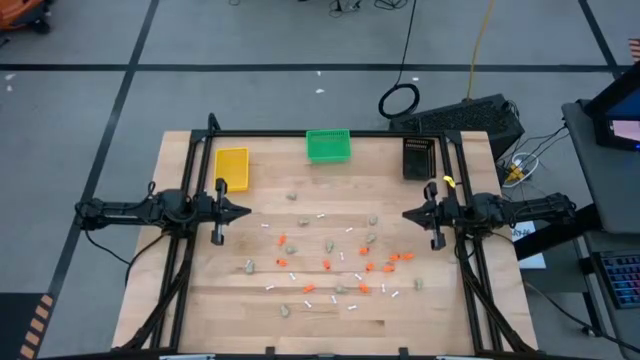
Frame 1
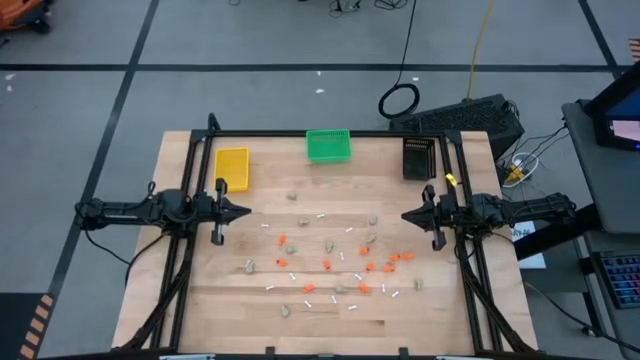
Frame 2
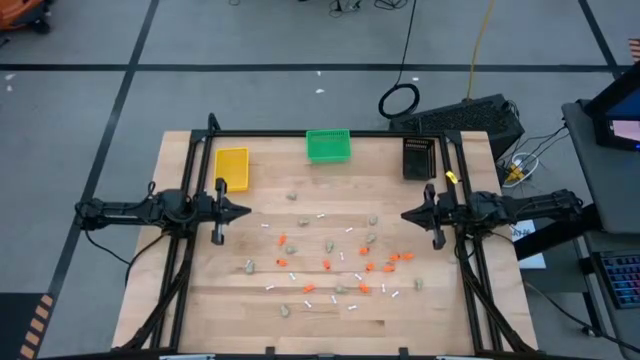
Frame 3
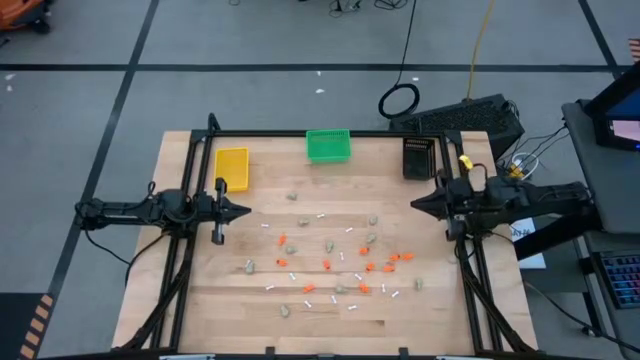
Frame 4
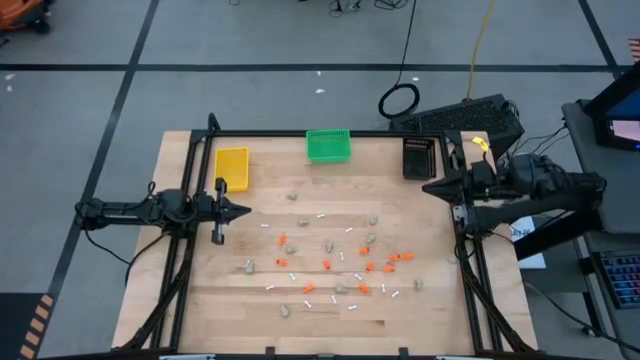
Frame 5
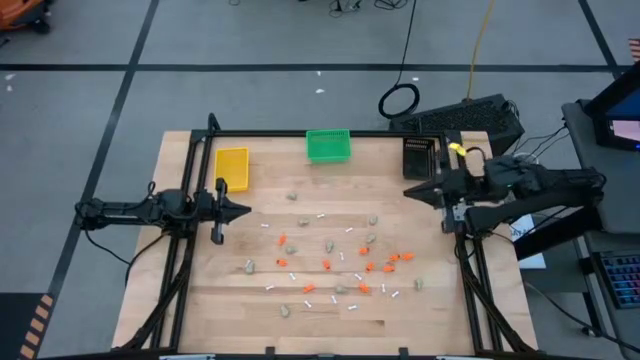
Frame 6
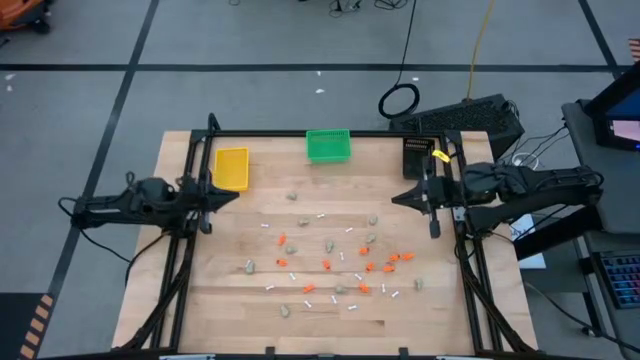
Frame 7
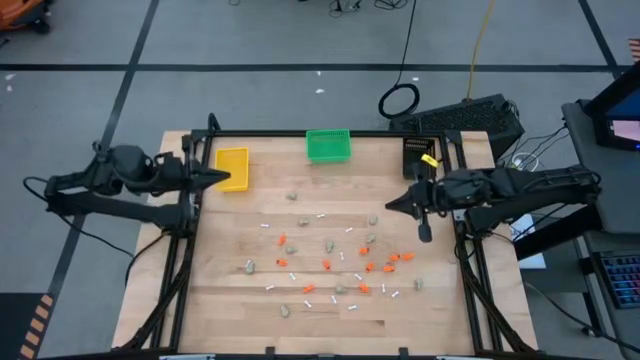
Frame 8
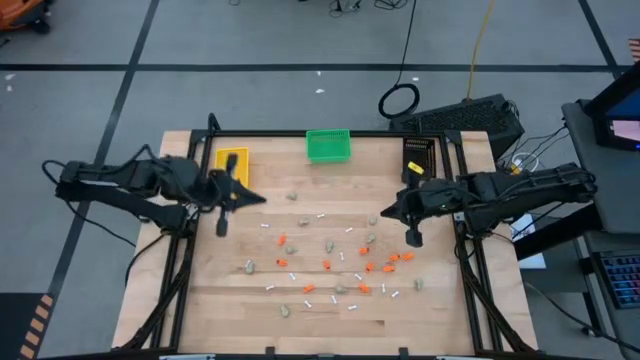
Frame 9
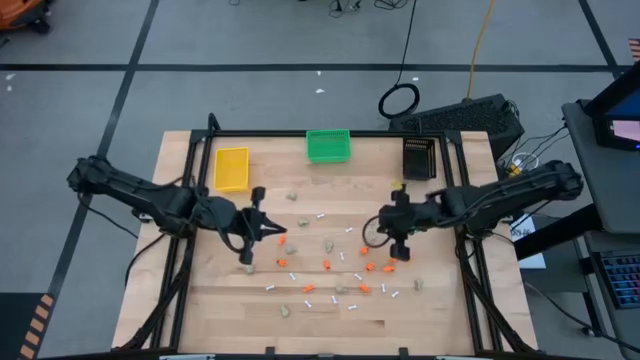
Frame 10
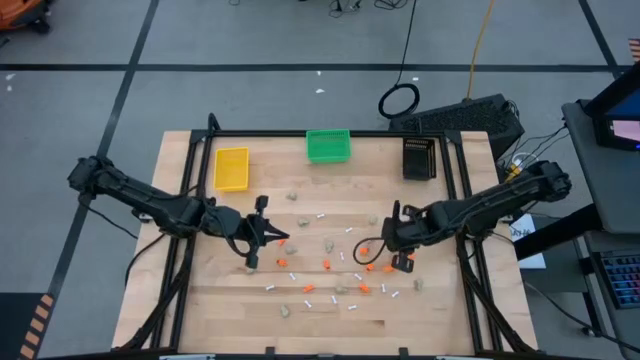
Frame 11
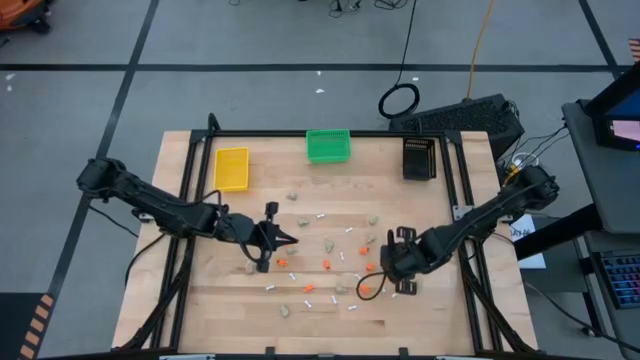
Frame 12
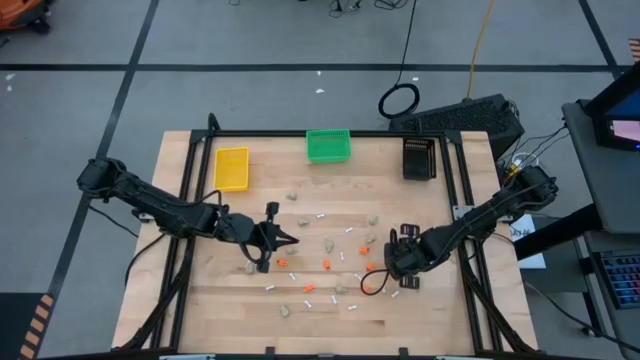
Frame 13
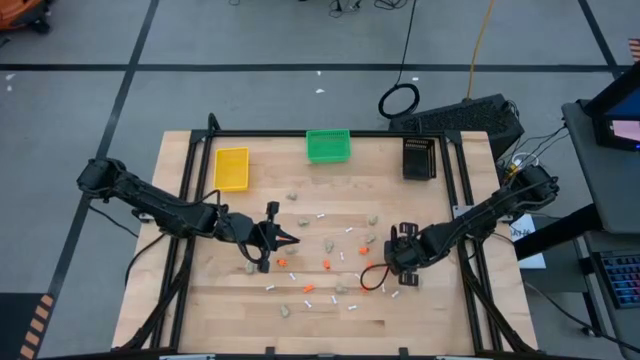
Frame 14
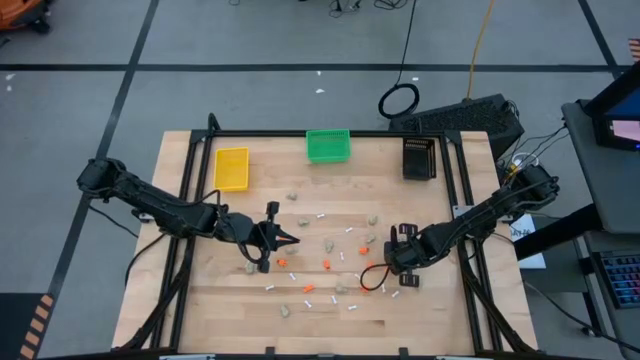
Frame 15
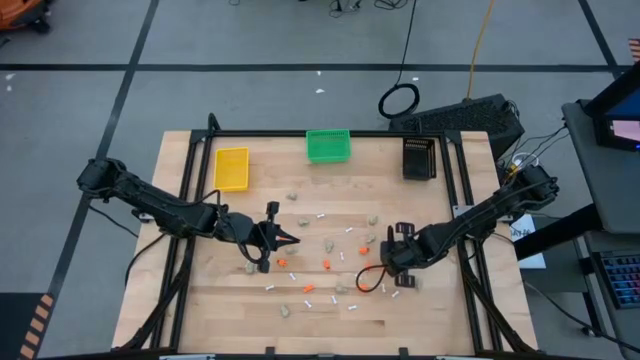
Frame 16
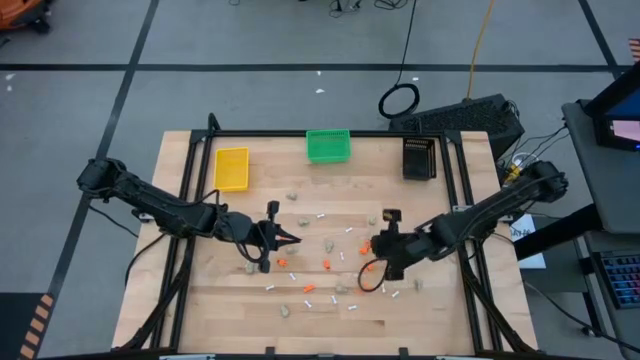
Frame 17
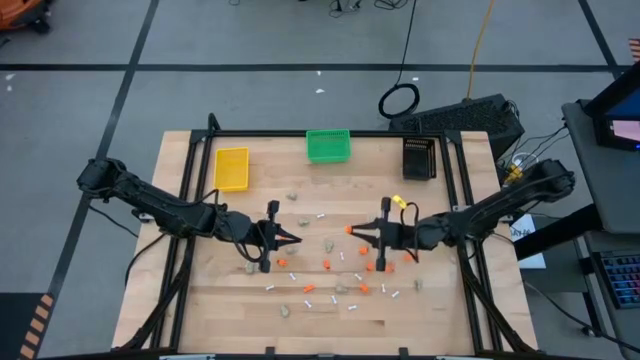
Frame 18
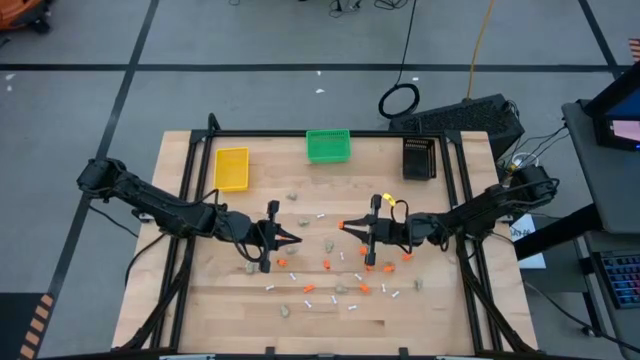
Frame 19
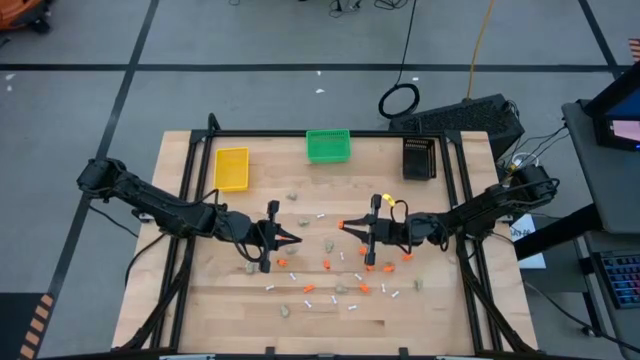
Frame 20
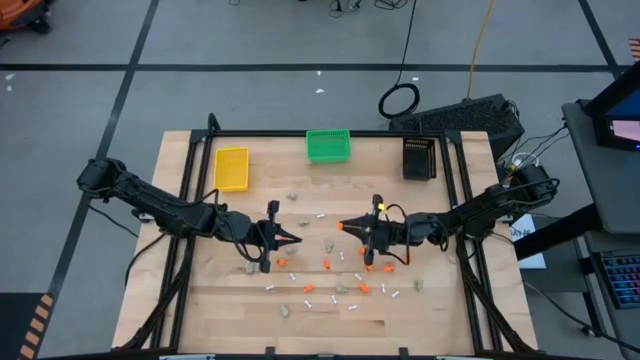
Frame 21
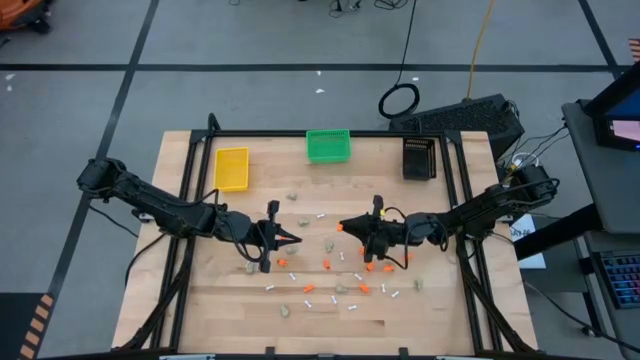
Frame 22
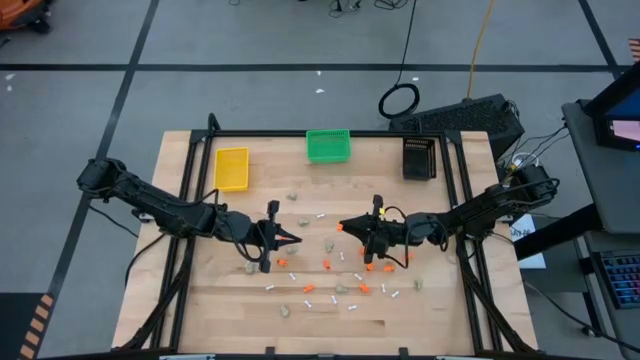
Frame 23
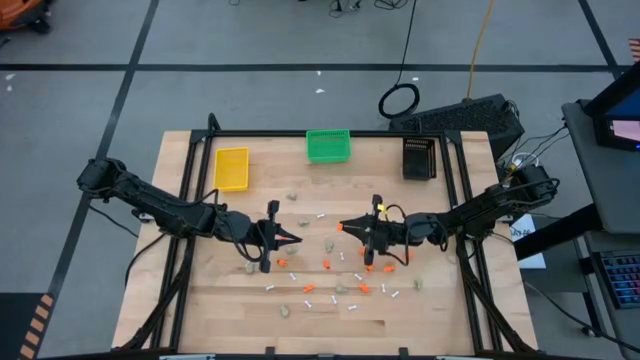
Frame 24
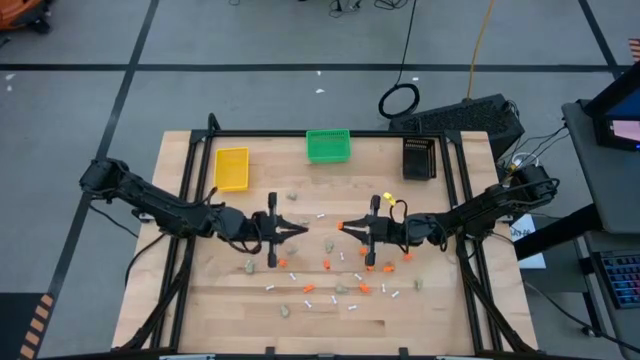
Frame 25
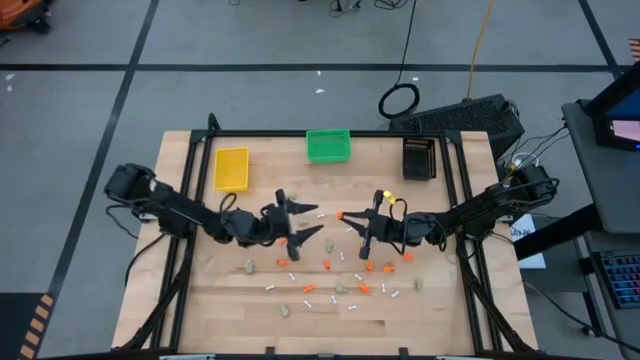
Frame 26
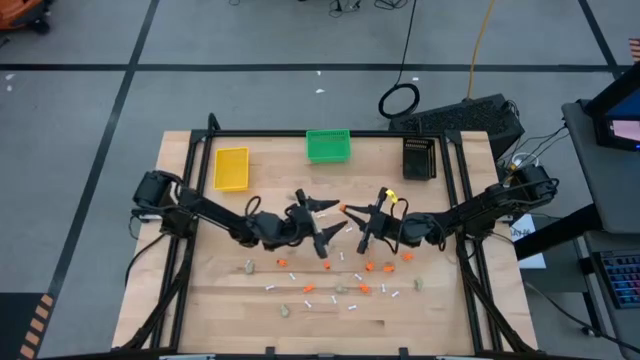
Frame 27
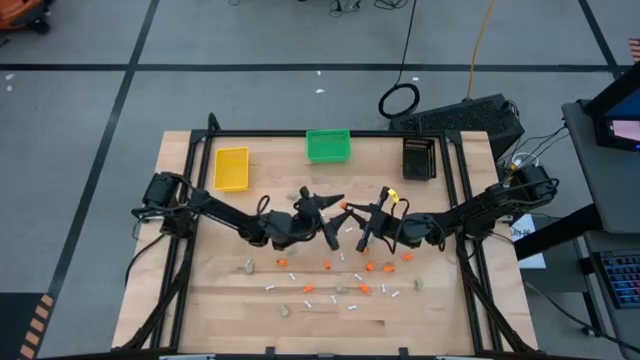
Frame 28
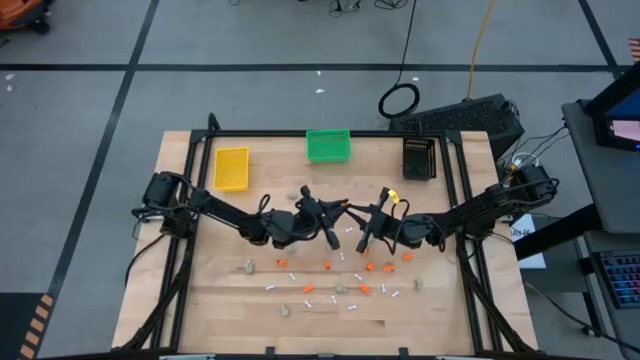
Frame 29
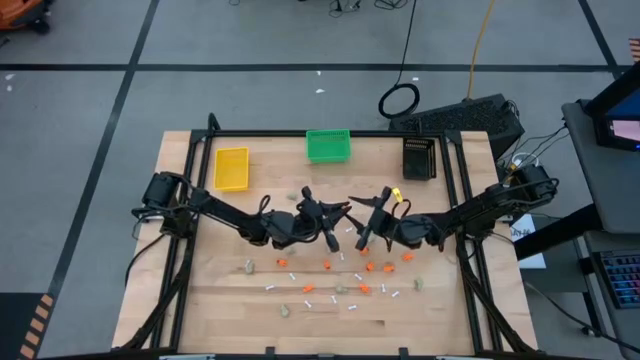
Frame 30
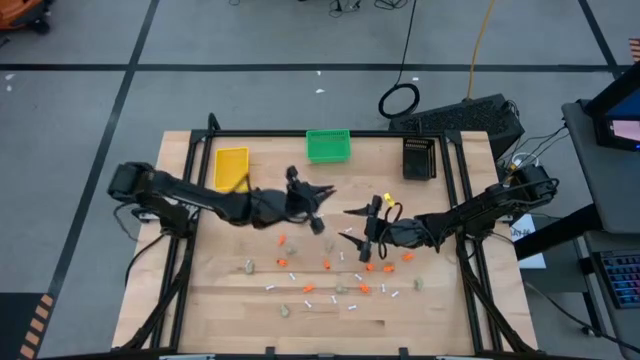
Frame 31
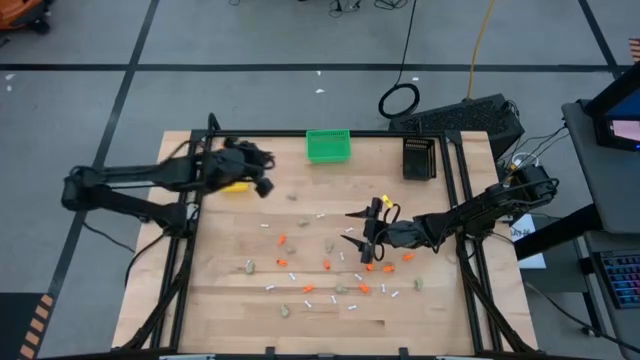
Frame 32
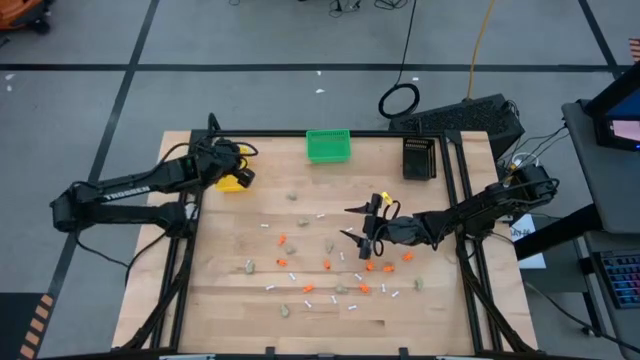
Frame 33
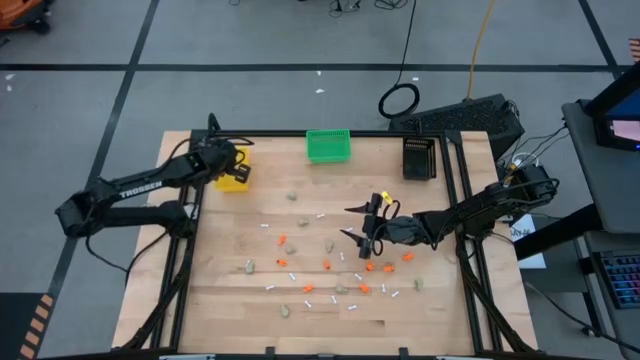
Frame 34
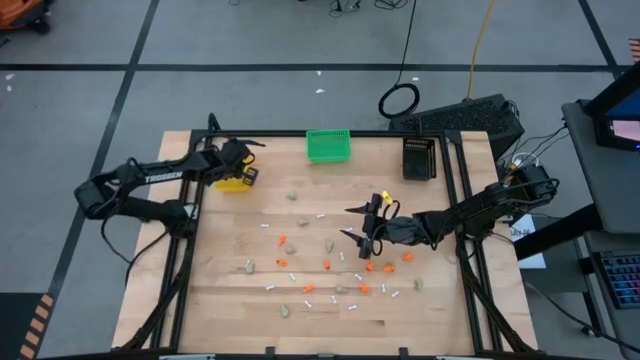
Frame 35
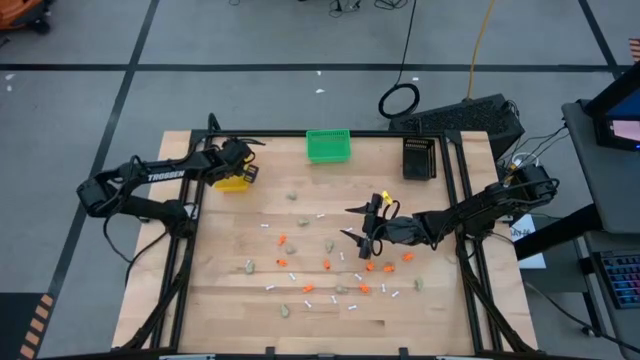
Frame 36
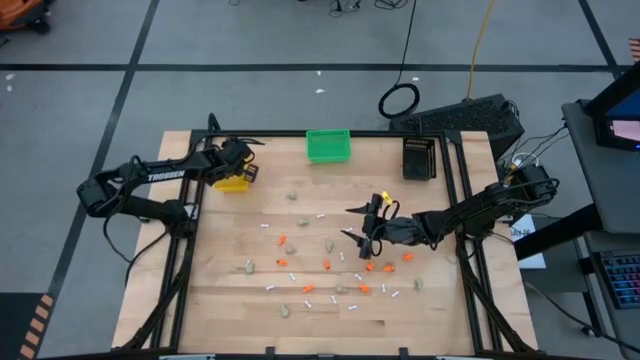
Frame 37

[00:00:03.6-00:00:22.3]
Task: Sort Halloween decoration
Put the orange skeleton toy into the yellow bin
